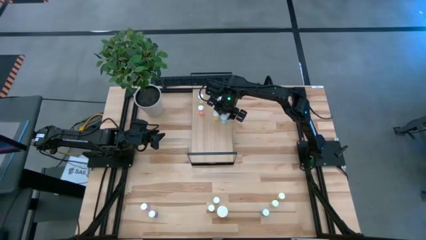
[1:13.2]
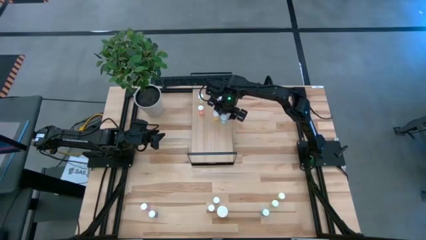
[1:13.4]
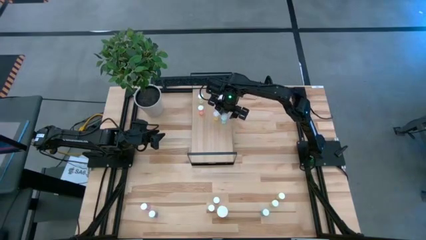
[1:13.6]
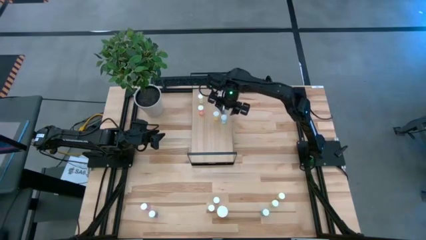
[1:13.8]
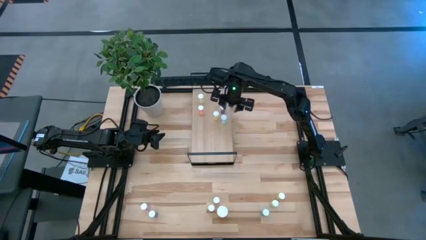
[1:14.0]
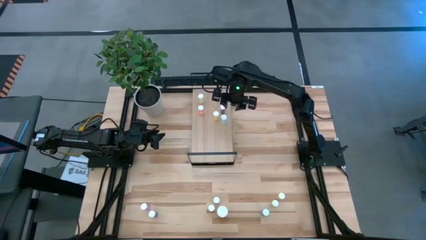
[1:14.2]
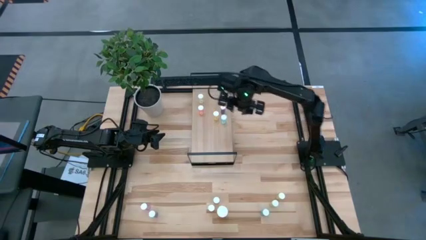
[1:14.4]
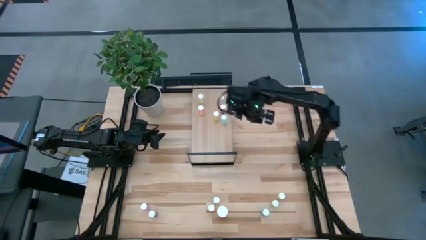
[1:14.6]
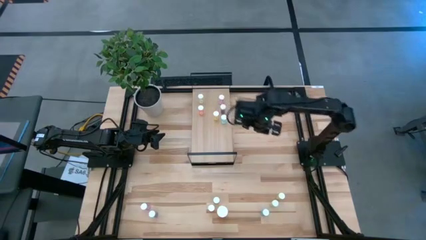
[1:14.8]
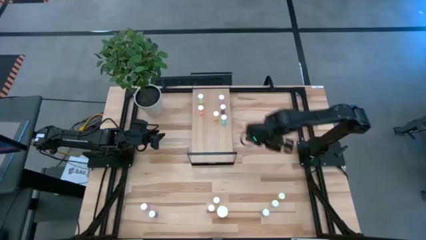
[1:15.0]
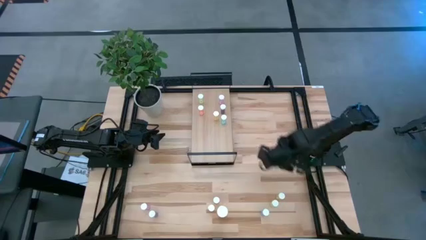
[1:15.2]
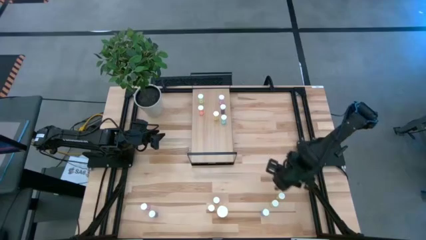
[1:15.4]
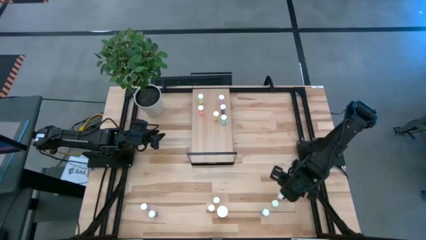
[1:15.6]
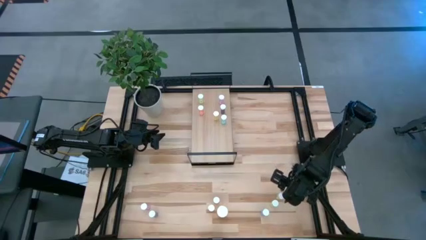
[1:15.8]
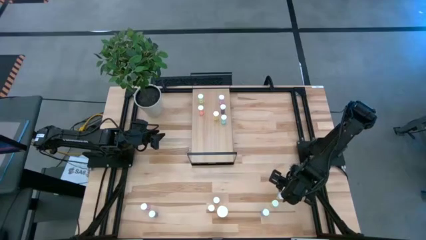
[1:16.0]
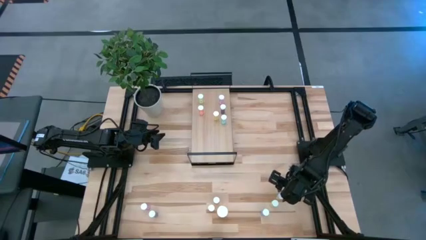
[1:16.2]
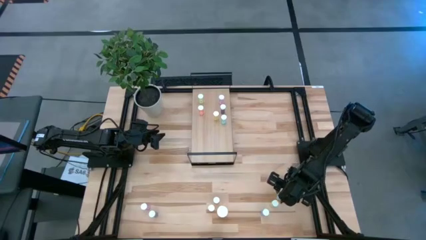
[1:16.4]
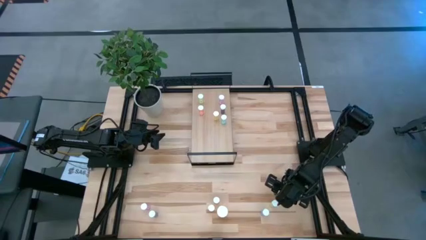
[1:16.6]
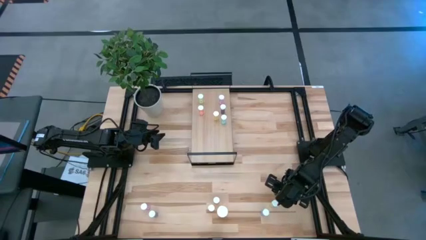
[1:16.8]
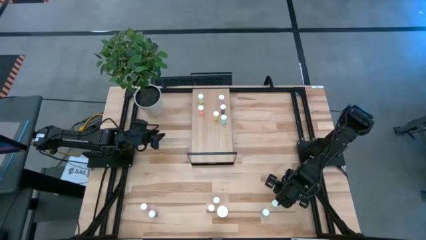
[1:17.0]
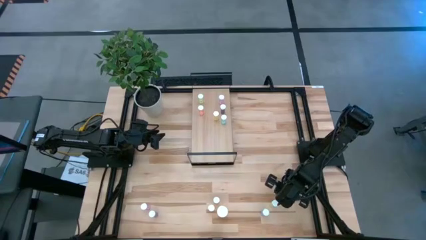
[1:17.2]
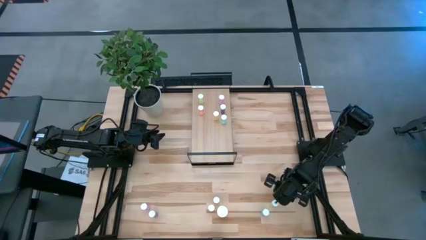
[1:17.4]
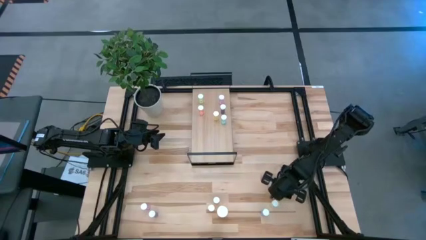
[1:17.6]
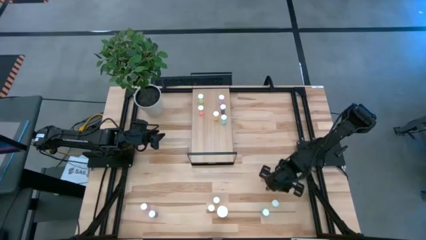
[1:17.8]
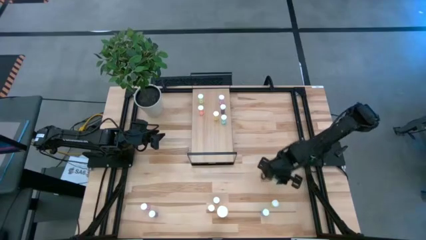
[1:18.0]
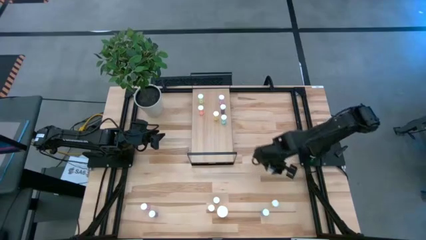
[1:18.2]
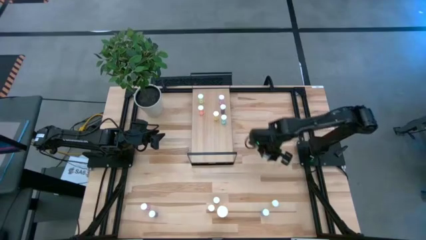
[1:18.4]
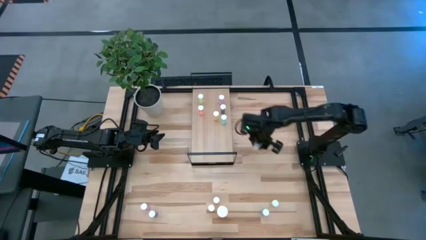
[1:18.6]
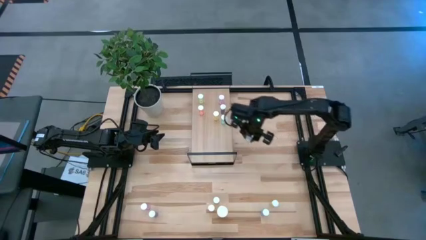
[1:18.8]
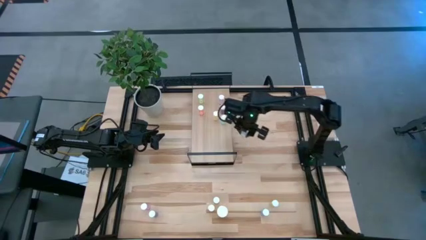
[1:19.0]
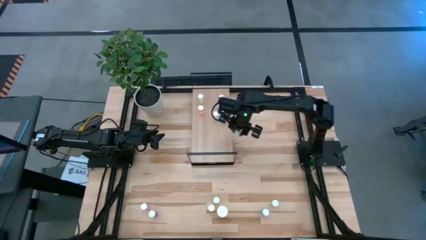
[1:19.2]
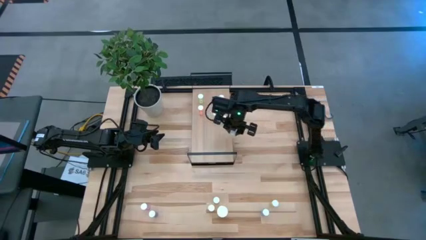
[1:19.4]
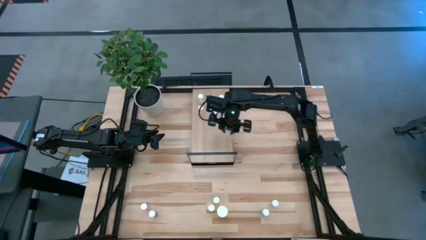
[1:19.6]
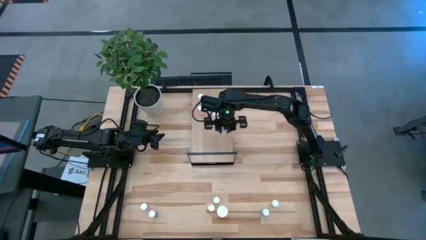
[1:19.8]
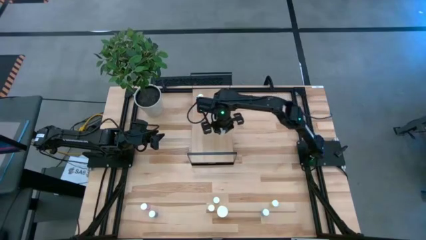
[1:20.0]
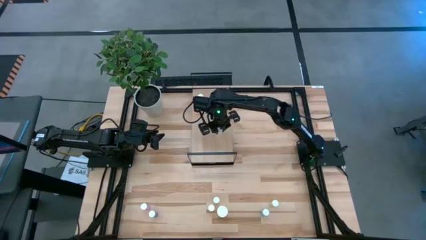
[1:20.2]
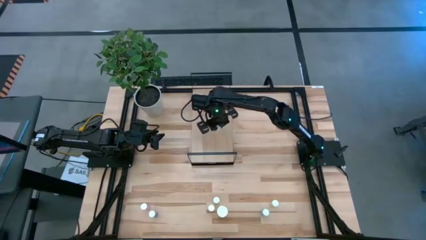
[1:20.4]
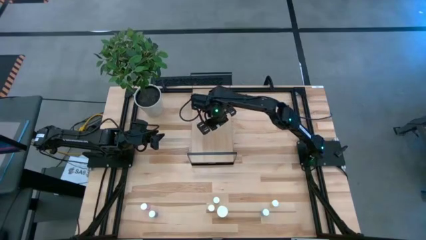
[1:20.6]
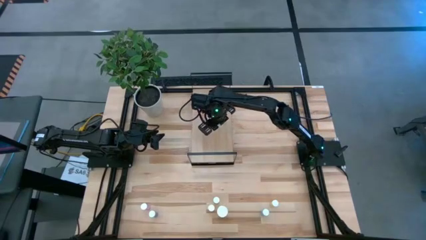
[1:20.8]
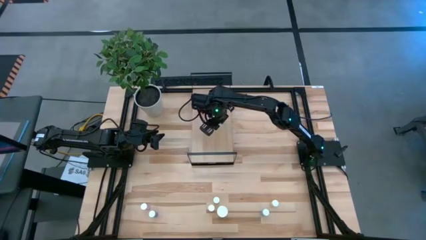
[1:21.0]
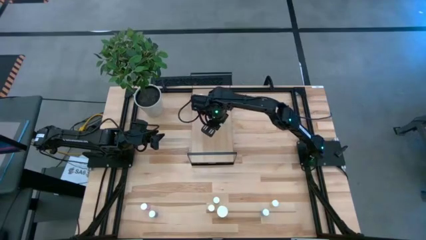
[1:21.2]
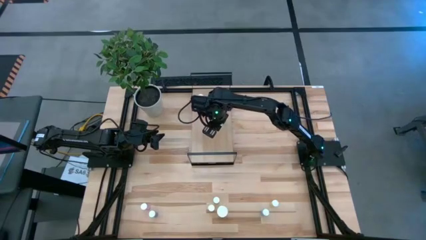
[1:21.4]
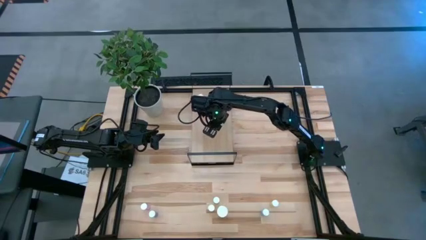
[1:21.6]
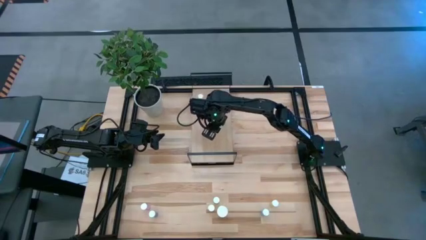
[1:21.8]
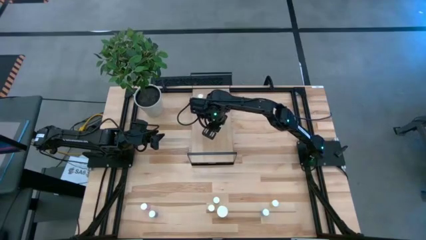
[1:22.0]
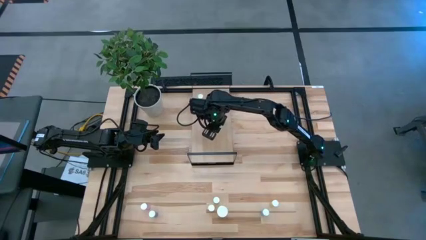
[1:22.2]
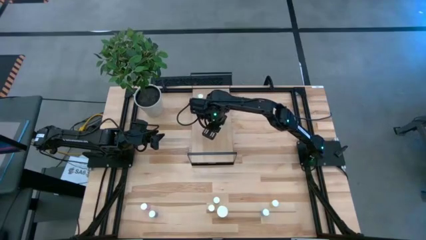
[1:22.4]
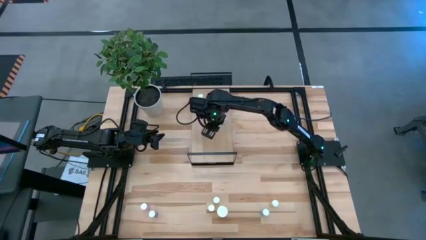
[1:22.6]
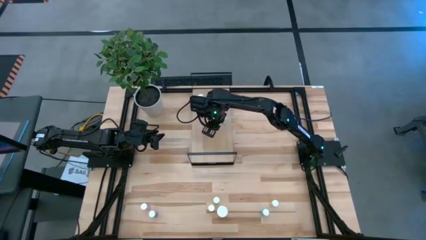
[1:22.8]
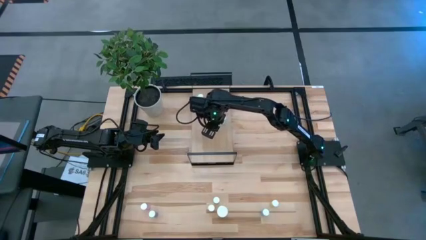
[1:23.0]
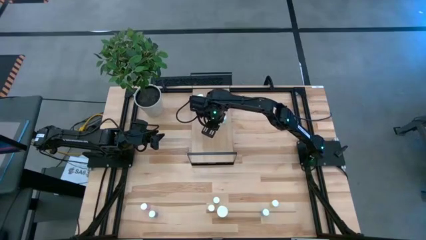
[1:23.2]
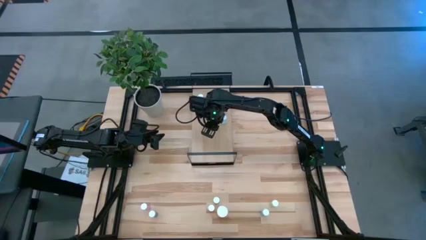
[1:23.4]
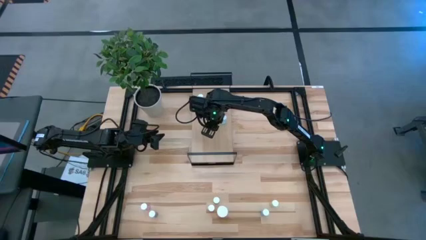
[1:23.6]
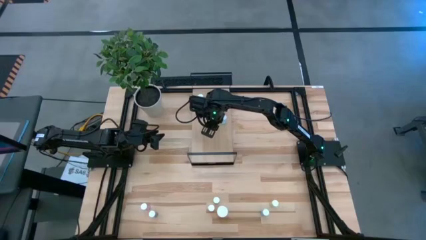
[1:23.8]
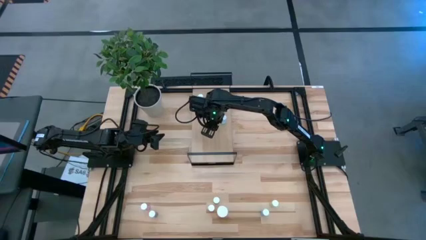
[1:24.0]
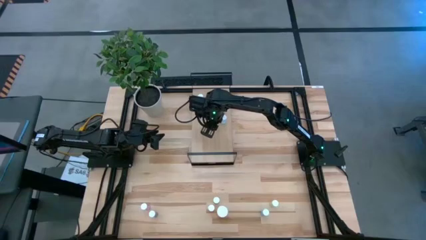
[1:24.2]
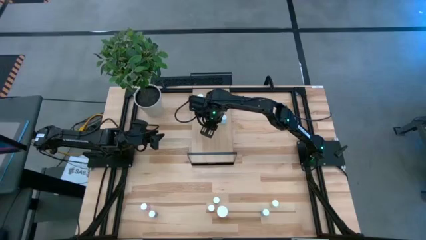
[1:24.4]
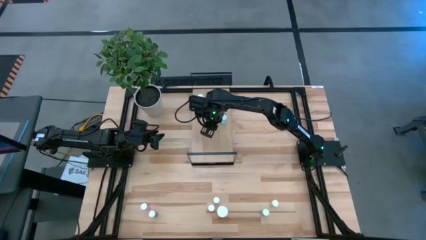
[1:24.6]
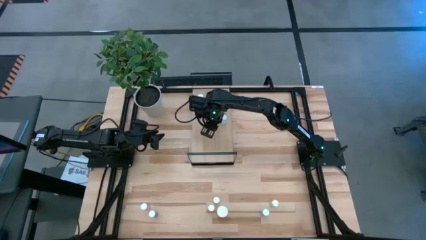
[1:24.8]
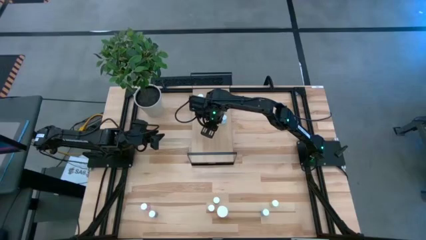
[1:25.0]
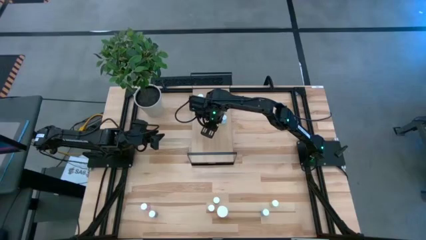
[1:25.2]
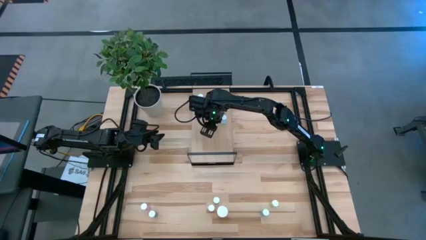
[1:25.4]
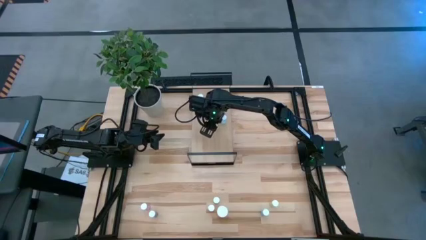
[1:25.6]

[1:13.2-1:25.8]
Task: Pick and place medicine bottles onto shelf by color
Put the yellow pill bottle on the shelf
